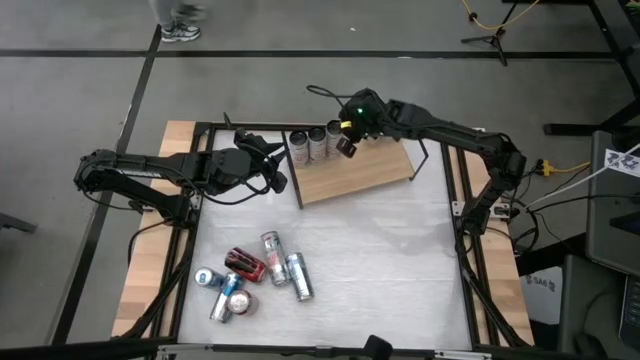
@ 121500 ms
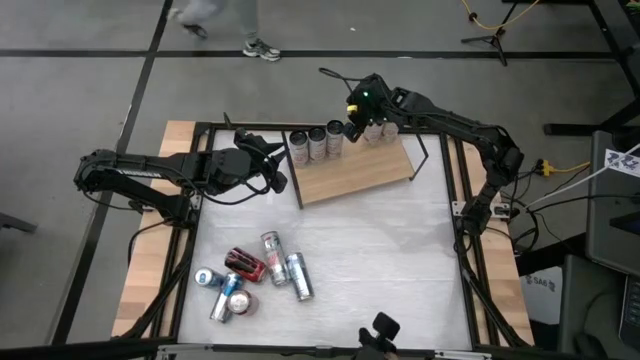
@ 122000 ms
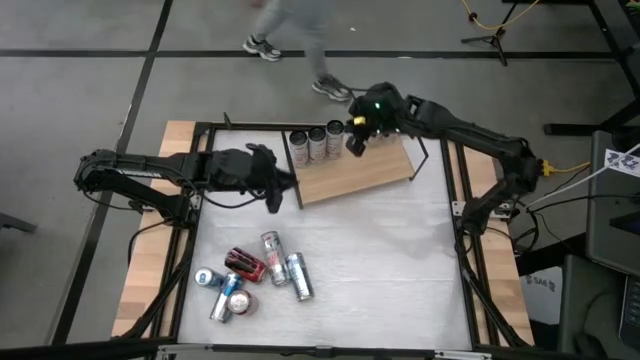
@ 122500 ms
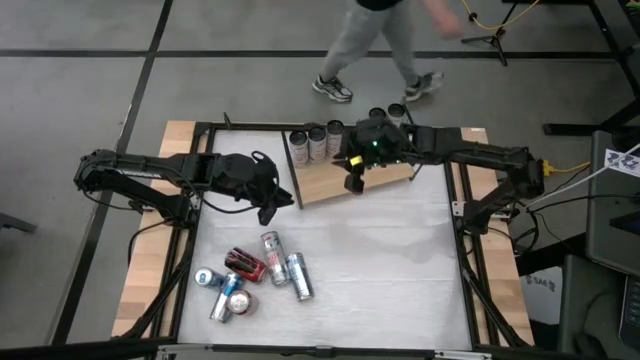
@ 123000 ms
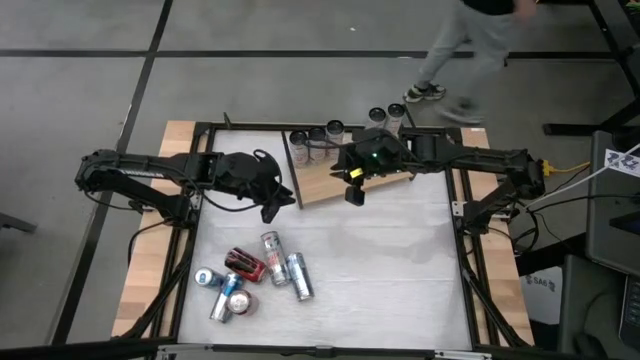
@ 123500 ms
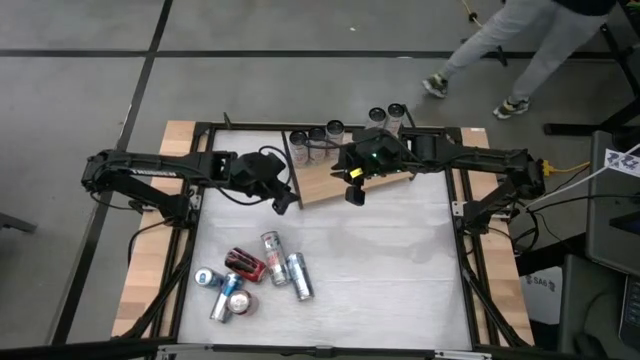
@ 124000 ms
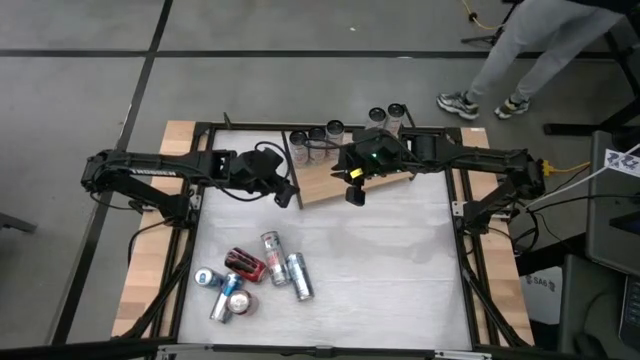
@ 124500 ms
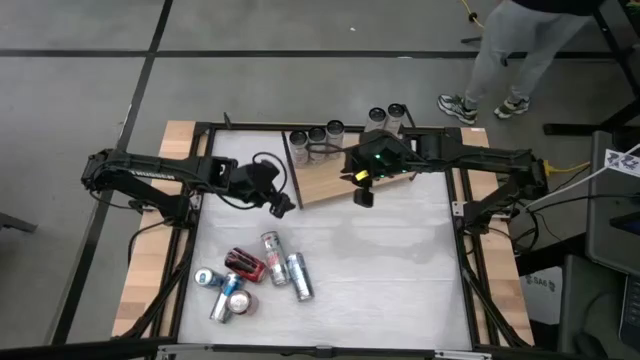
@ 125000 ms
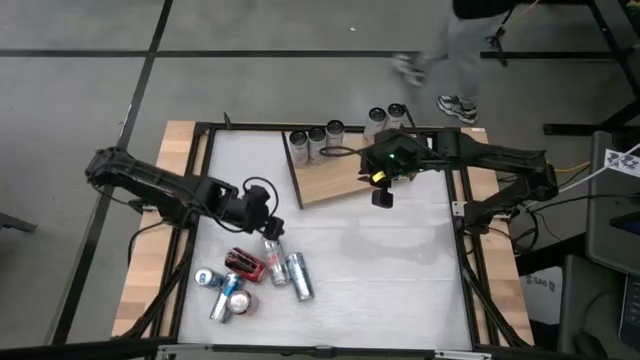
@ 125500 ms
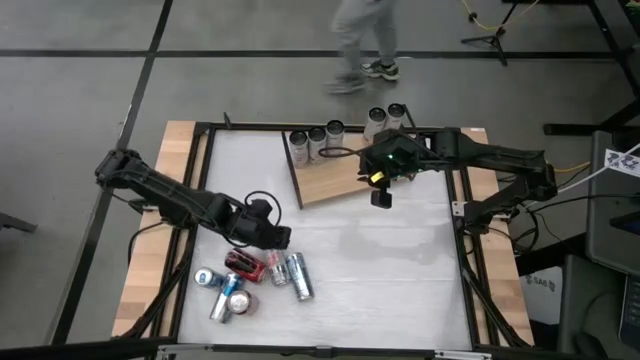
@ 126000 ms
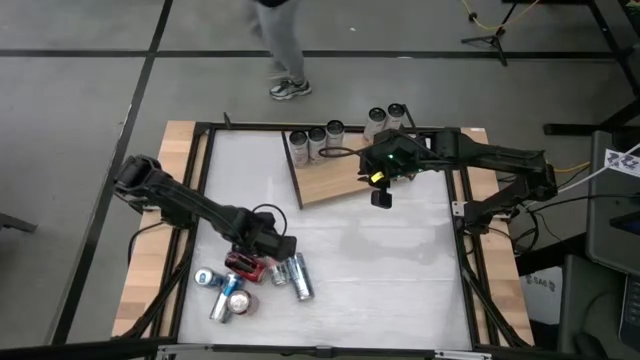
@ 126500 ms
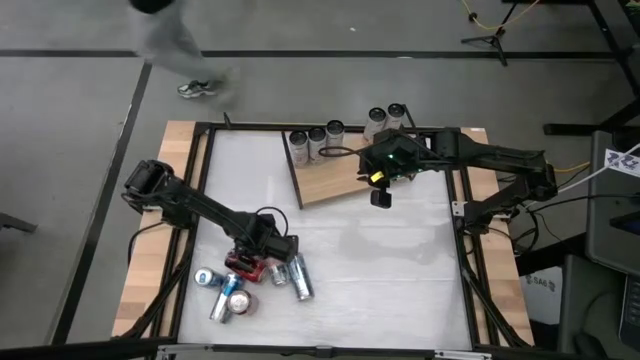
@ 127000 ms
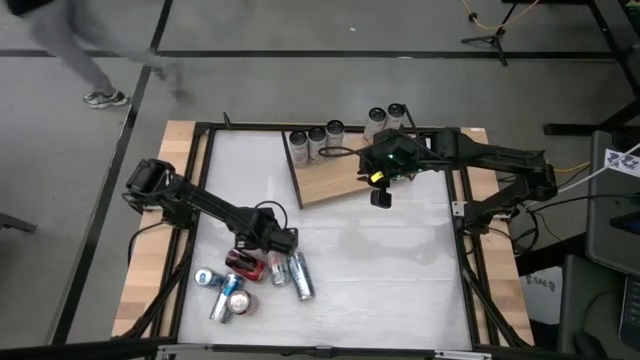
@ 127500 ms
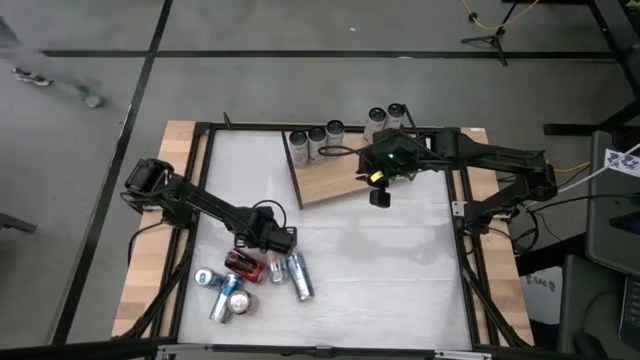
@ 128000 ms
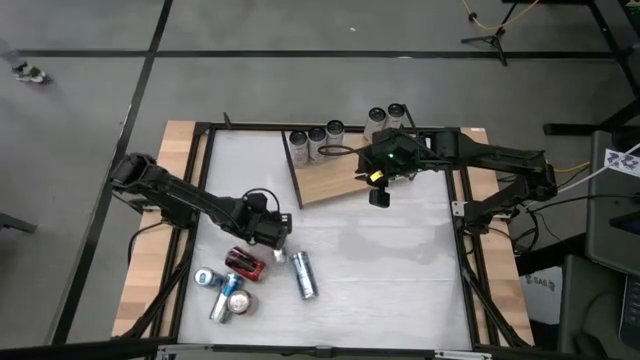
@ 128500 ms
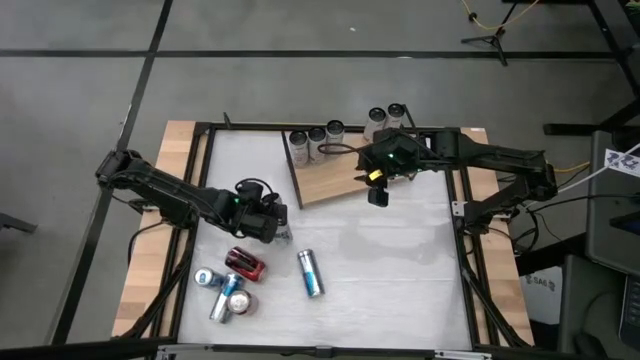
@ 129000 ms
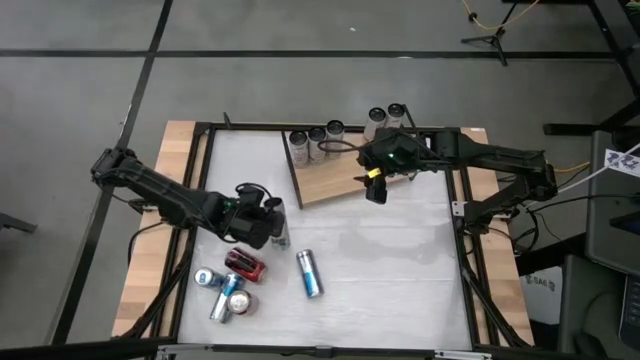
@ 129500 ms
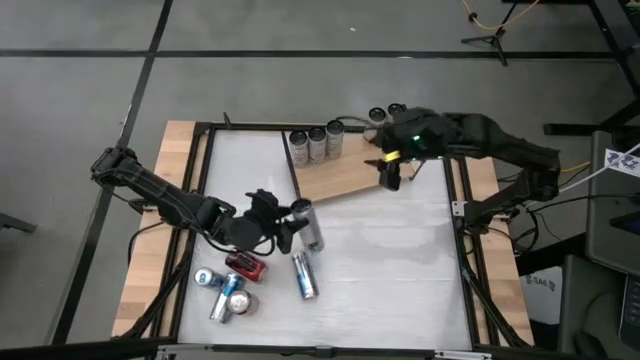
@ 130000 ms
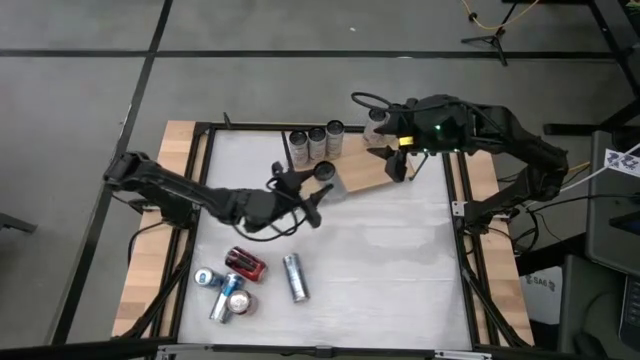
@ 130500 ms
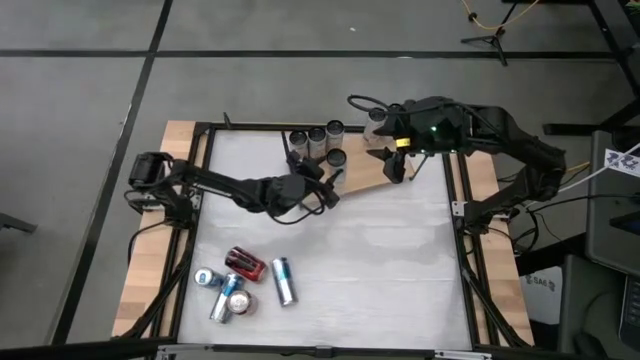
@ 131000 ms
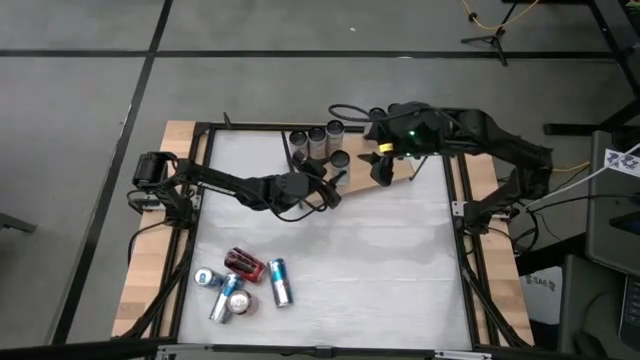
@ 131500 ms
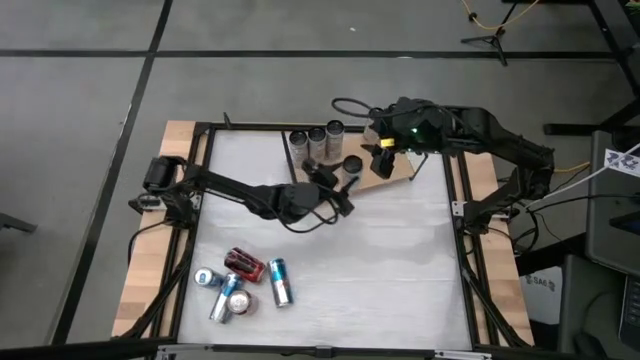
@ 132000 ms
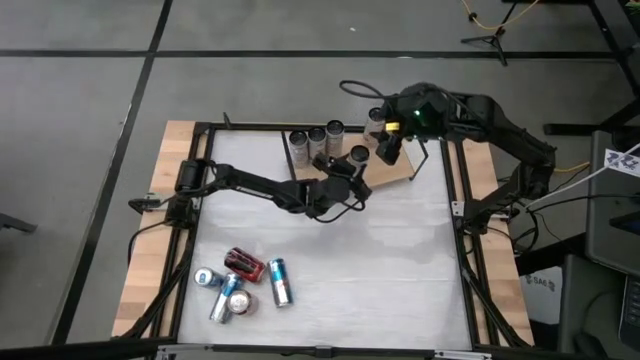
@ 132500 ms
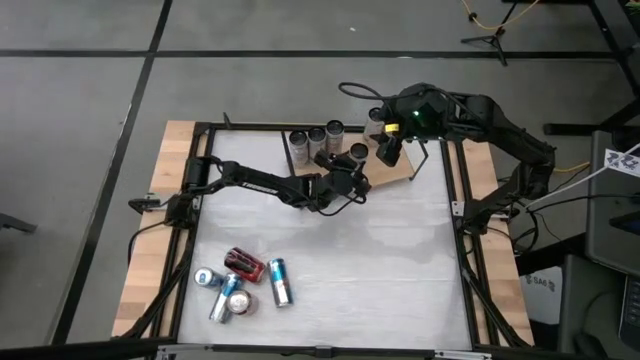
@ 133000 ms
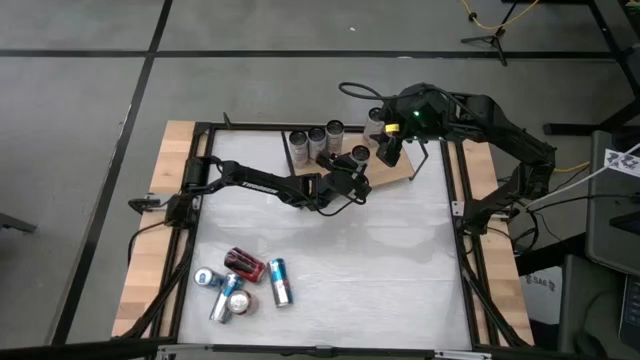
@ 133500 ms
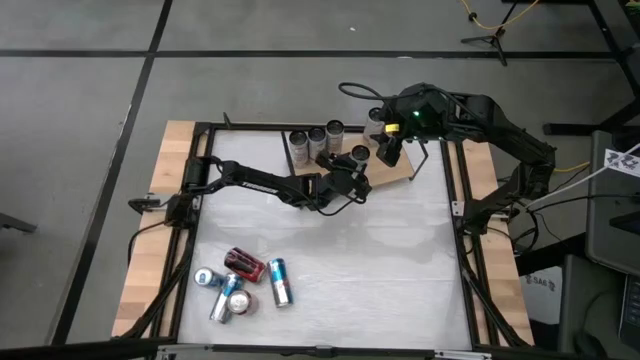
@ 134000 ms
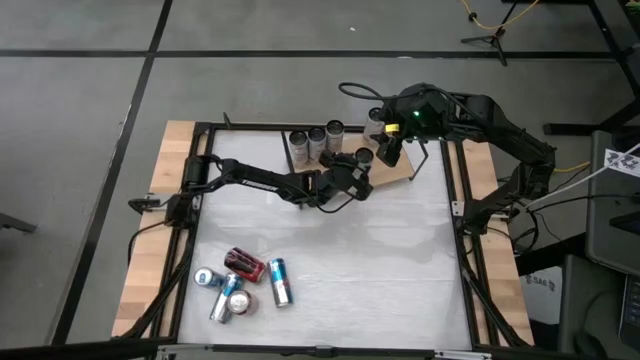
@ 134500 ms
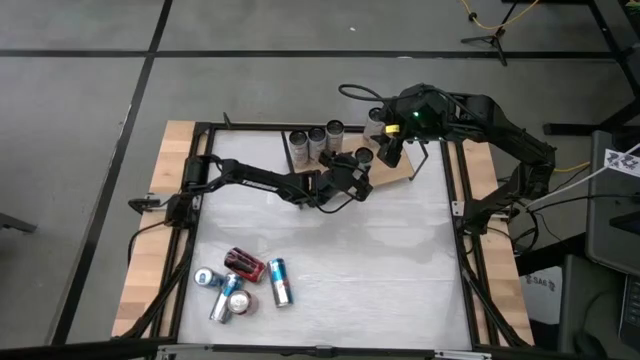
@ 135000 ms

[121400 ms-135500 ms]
Task: Place canned beverage on shelf
Put the white pink soda can on the shelf aligned with the other white pink soda cans

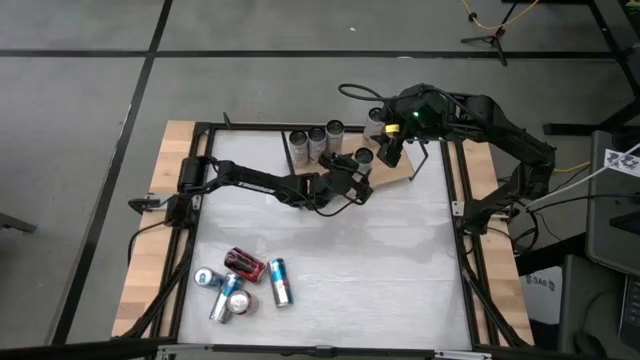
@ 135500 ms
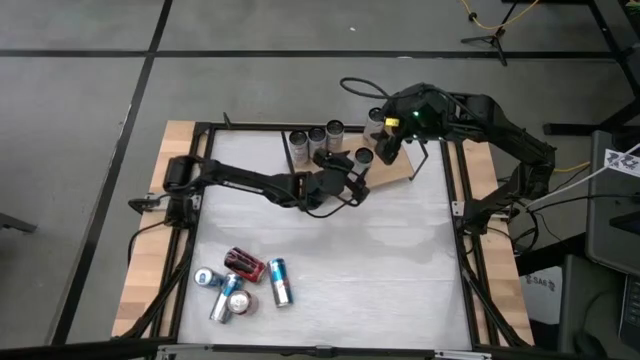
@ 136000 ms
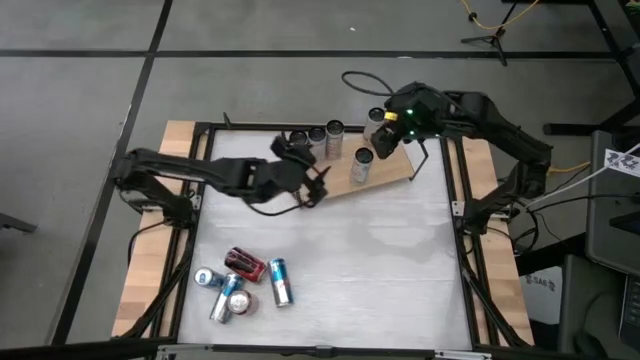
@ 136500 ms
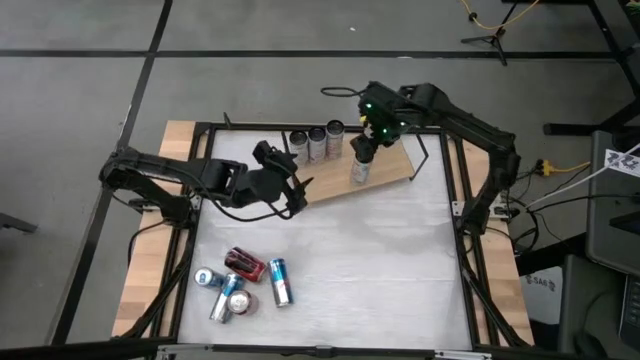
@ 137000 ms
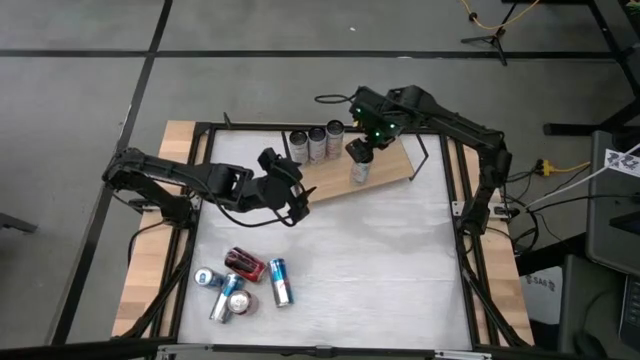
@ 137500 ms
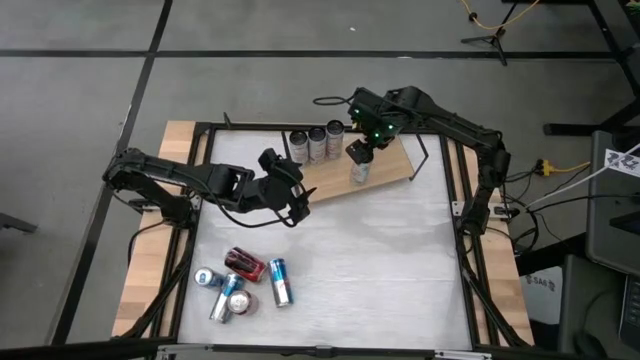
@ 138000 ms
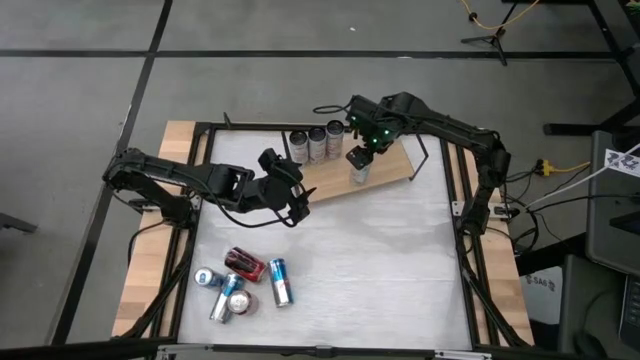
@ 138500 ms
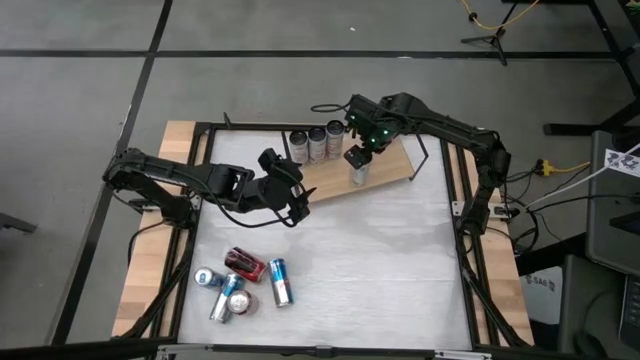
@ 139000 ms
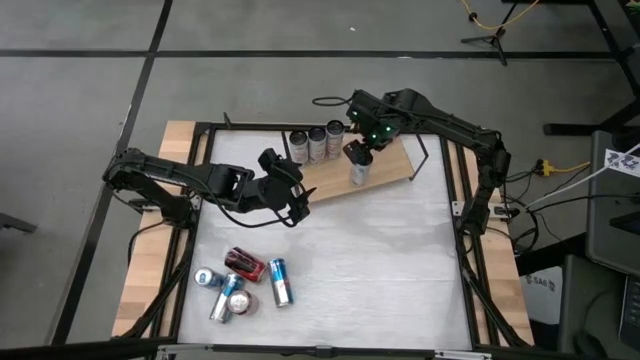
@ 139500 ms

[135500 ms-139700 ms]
Put the white pink soda can on the shelf aligned with the other white pink soda cans

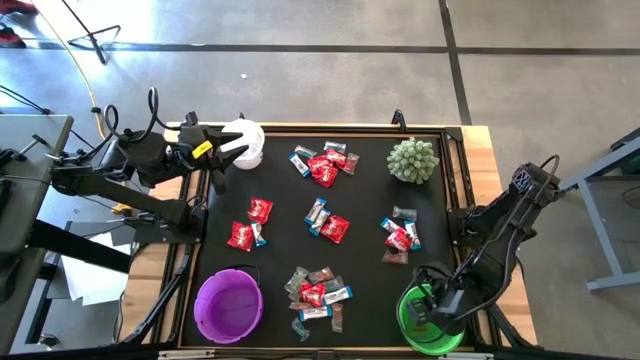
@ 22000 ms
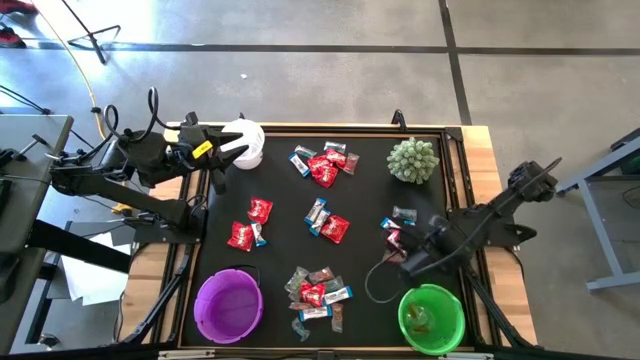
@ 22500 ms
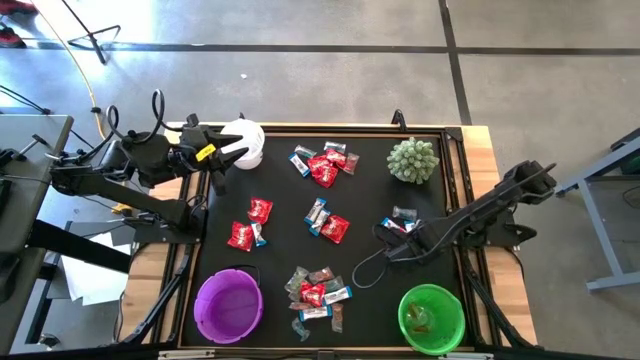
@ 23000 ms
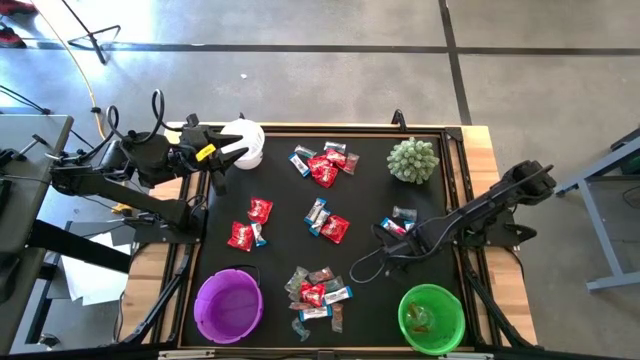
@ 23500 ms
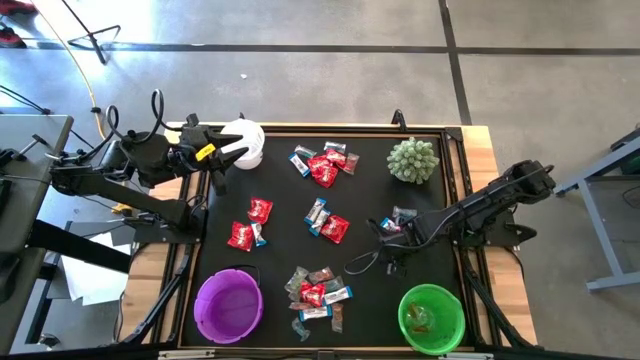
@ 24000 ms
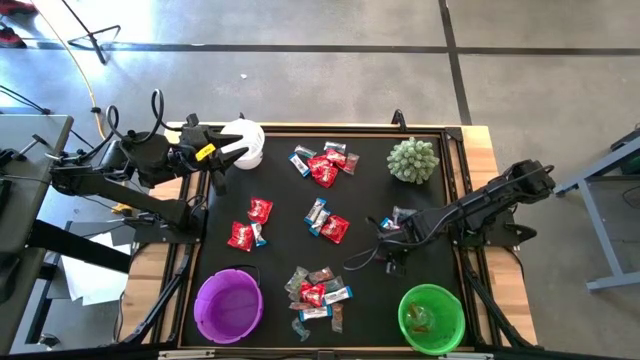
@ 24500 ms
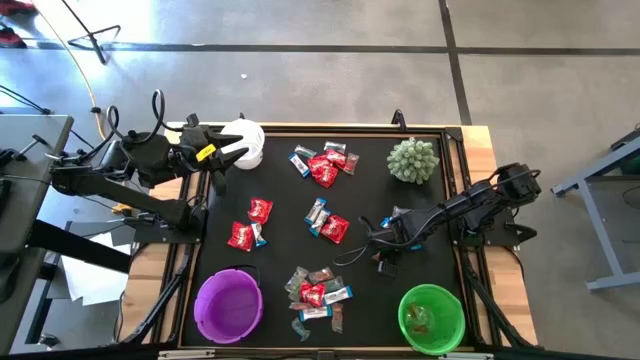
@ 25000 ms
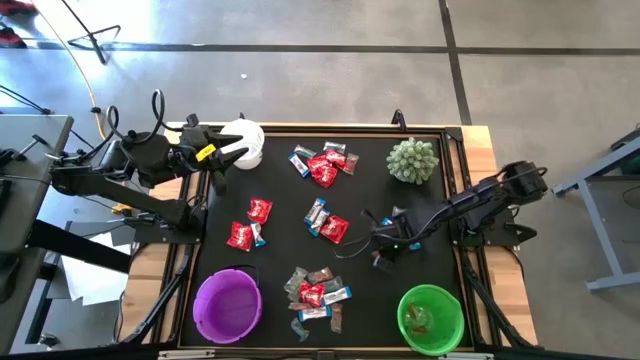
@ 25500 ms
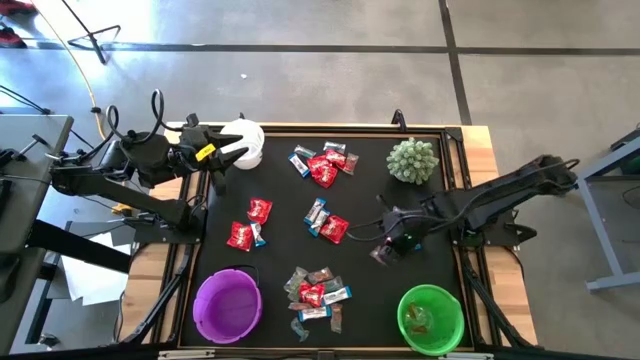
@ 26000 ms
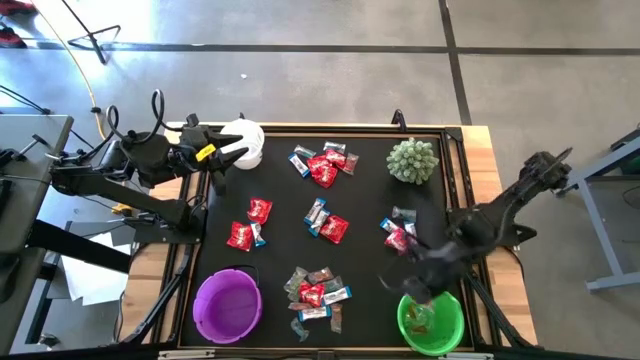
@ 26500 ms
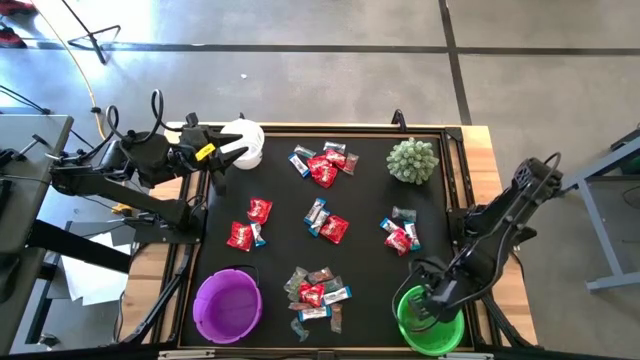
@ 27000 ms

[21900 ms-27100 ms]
Task: Sort candy
Put the red gummy into the green bucket
